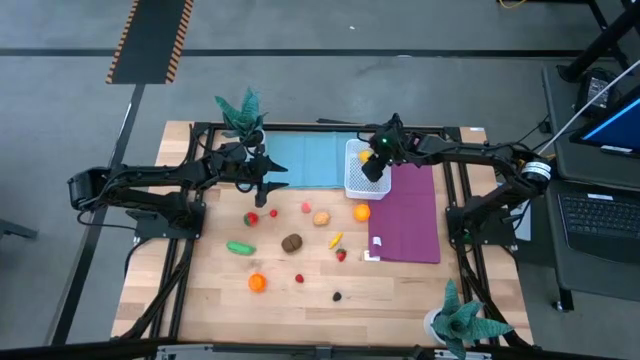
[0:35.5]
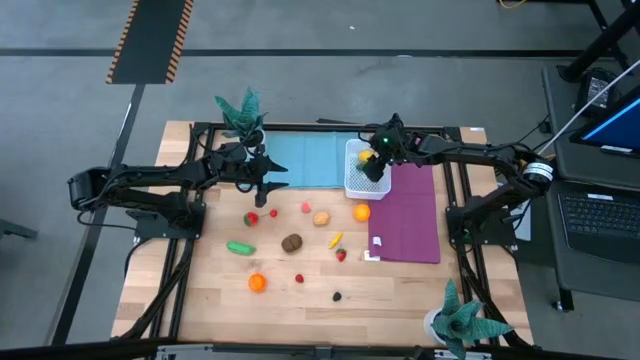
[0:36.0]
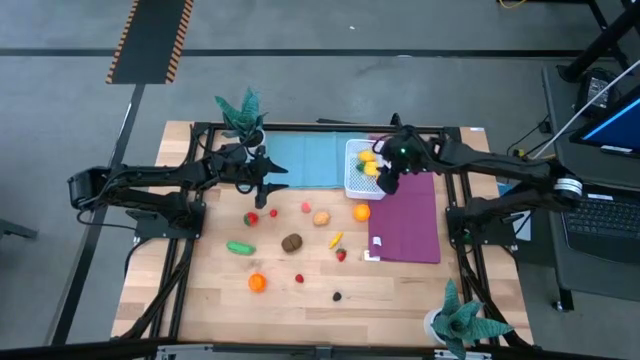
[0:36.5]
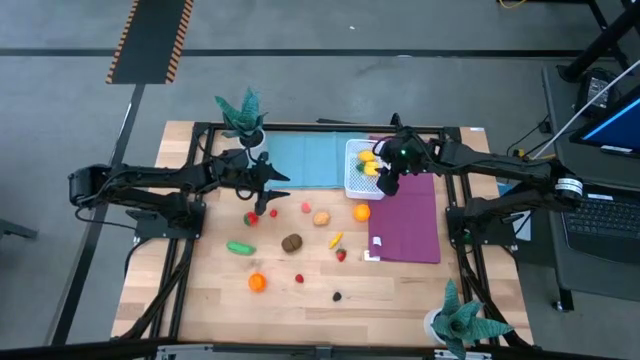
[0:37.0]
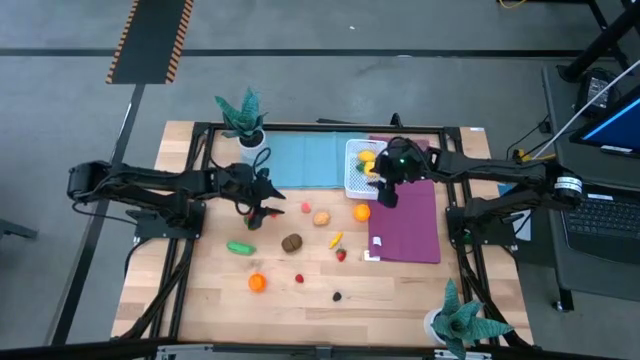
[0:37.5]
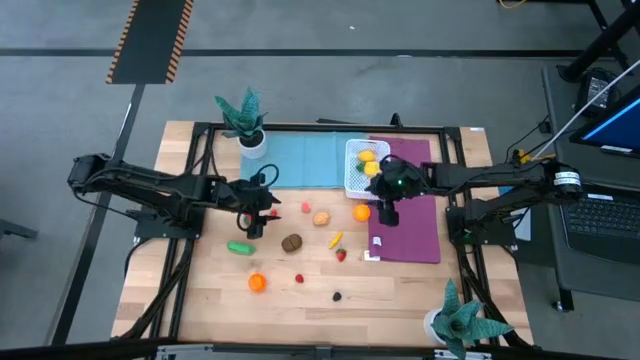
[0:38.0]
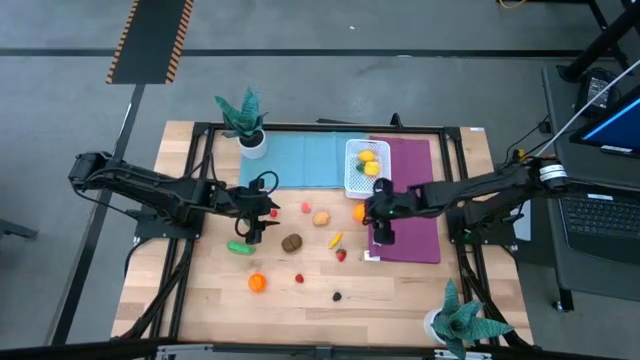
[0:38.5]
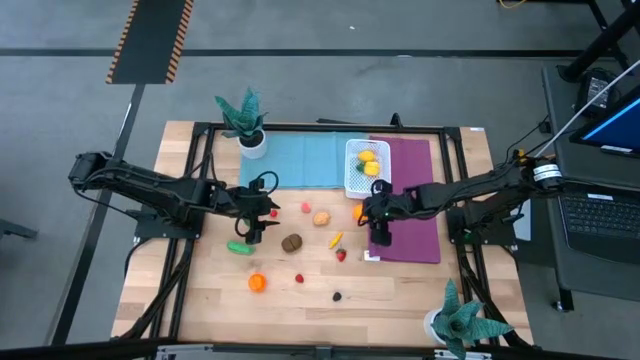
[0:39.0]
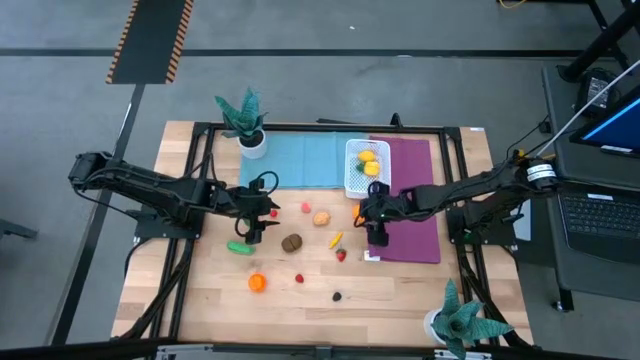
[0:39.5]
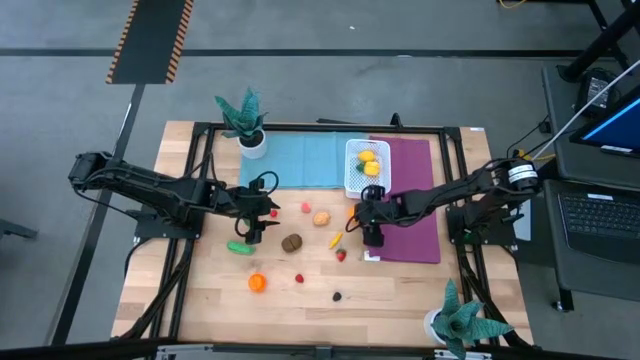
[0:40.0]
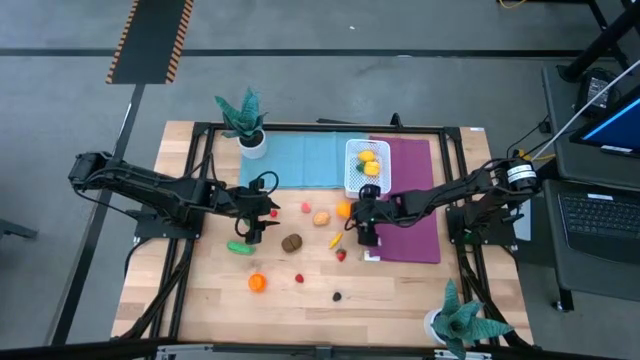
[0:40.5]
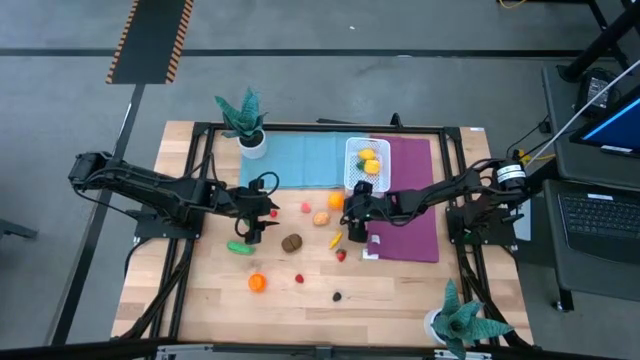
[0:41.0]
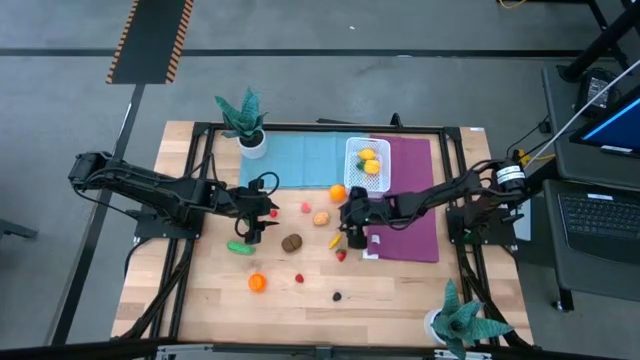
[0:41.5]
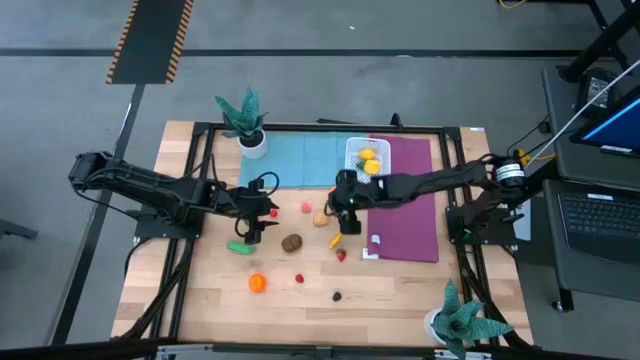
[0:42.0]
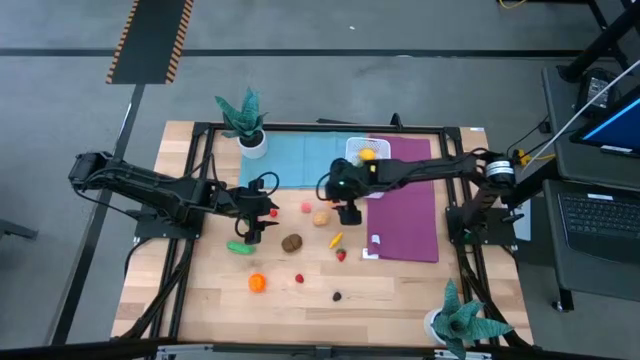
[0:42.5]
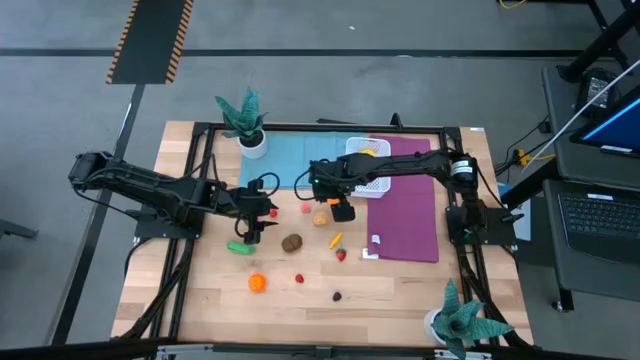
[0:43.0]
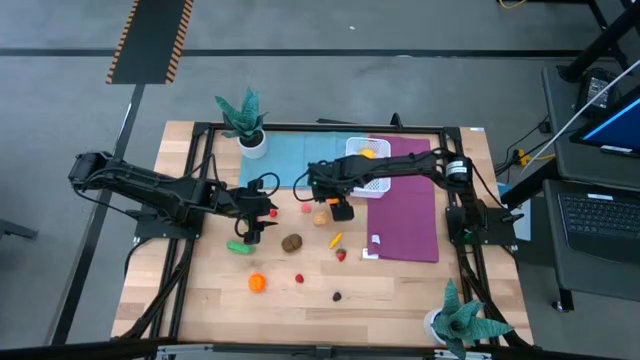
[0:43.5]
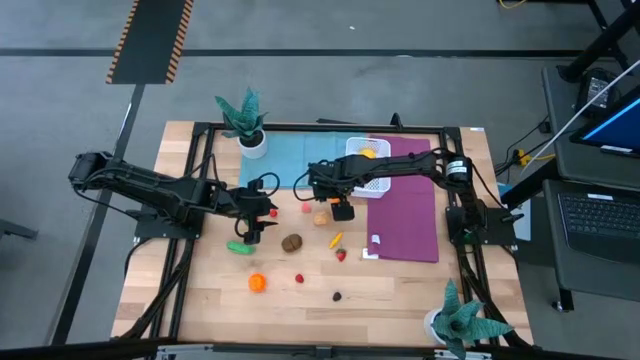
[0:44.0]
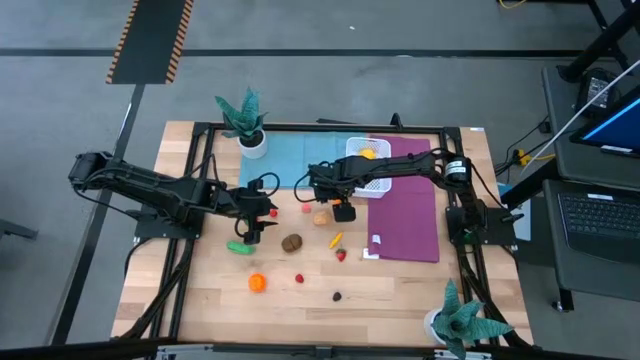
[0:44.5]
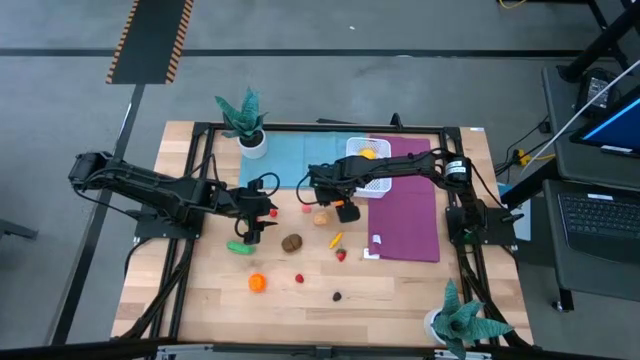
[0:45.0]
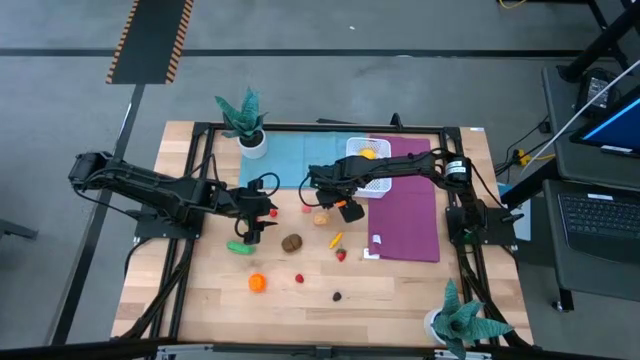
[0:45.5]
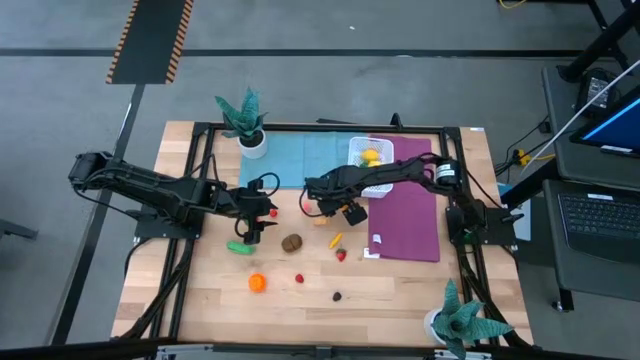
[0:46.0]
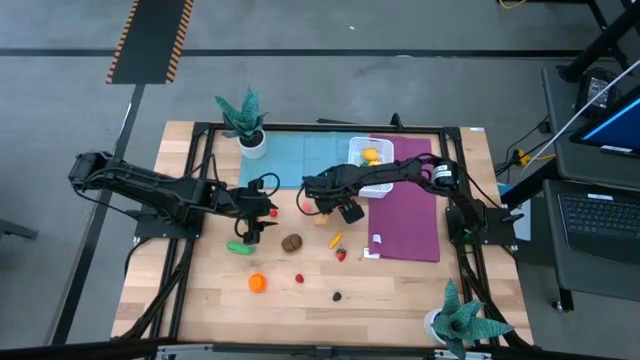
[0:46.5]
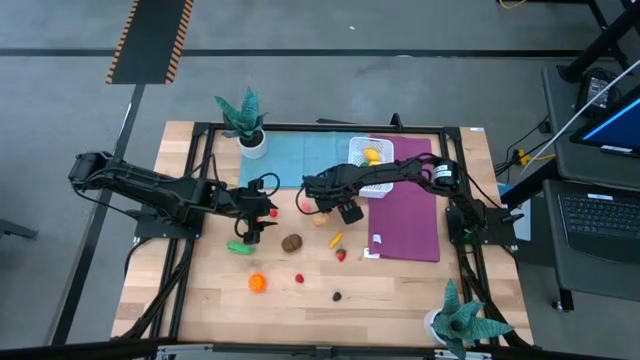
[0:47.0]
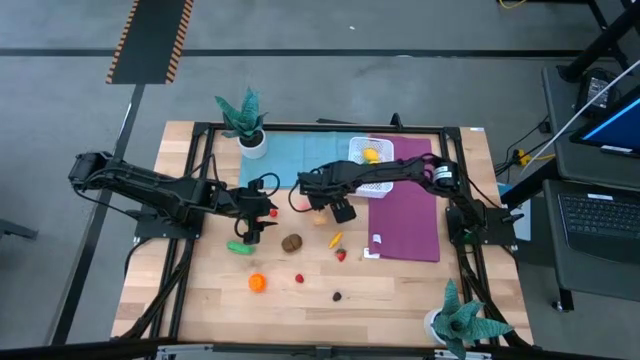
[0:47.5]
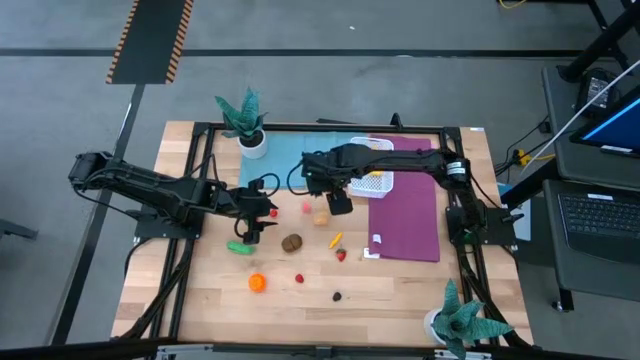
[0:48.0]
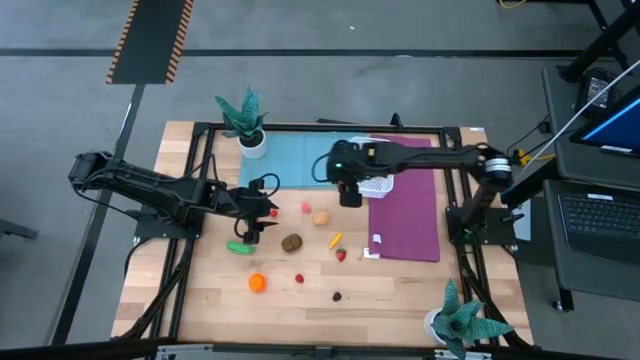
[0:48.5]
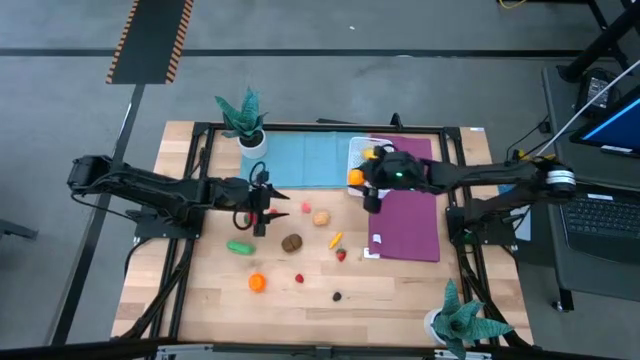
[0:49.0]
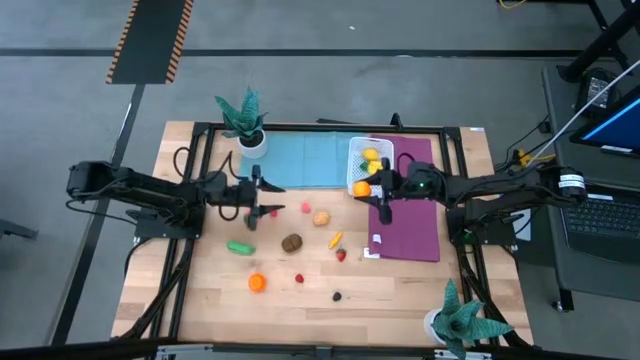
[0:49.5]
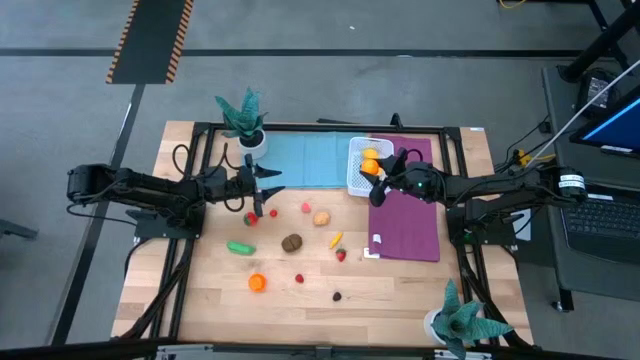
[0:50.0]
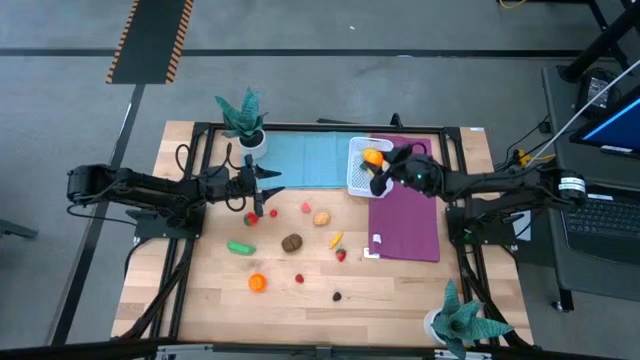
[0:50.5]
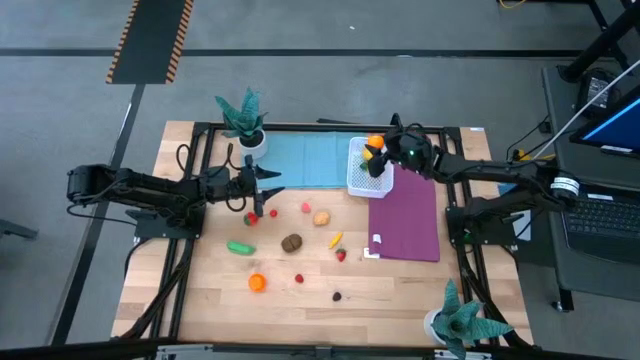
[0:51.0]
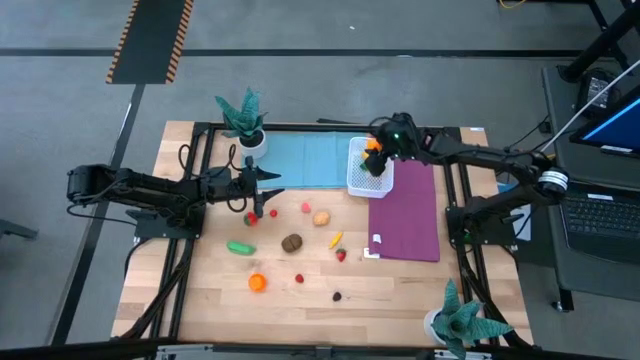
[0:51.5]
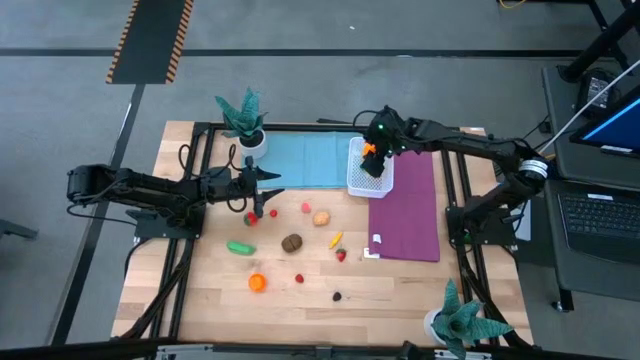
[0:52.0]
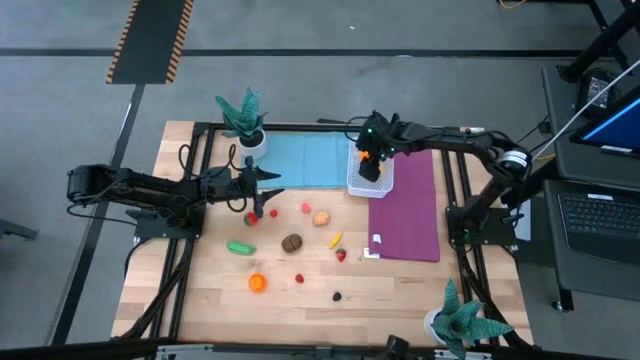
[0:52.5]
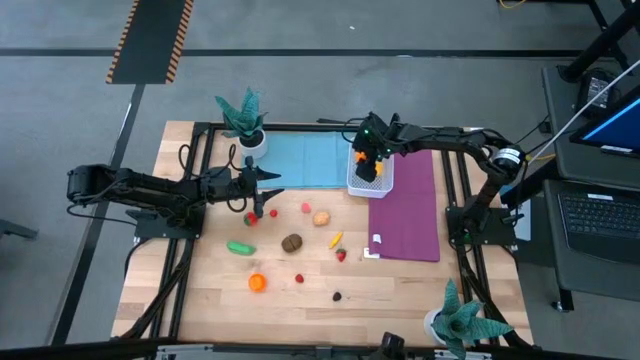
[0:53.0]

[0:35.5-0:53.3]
Task: Pick and placing Produce into tupperware
Put the orange orange into the white container

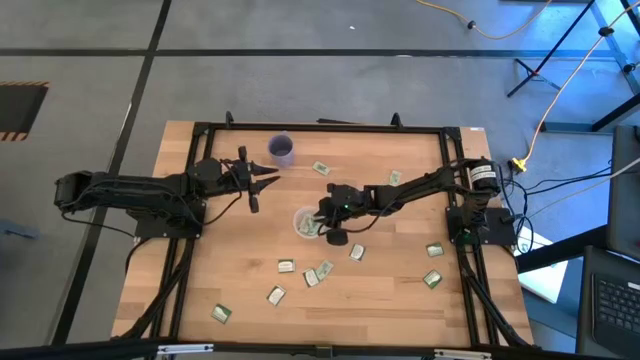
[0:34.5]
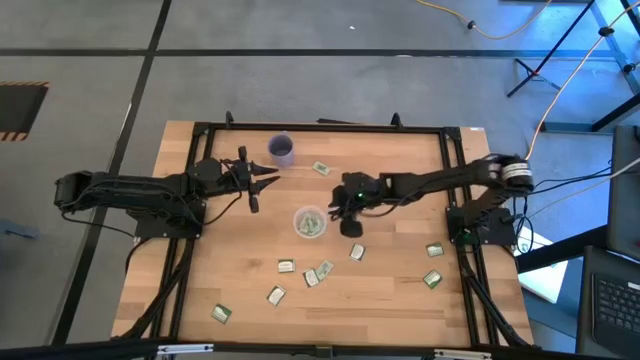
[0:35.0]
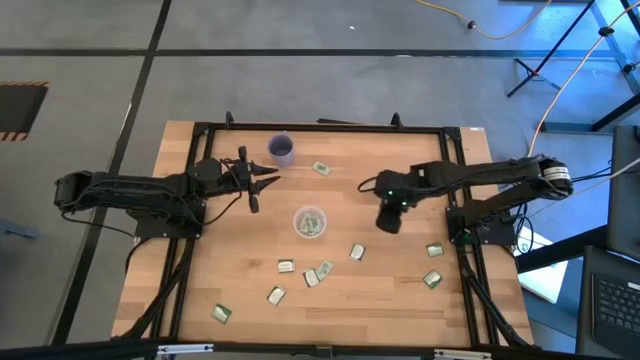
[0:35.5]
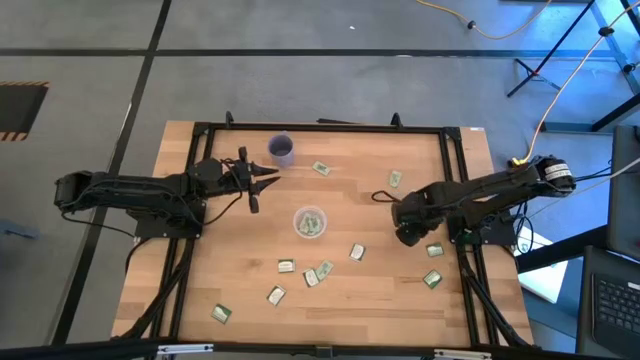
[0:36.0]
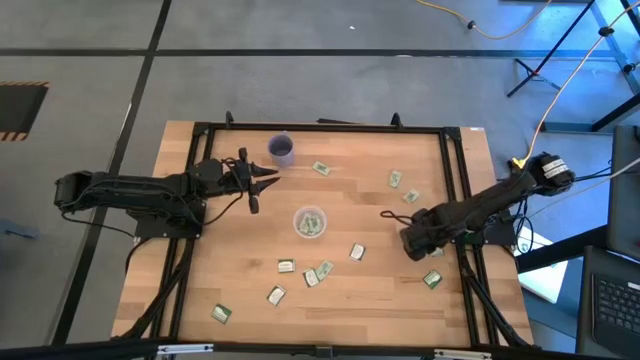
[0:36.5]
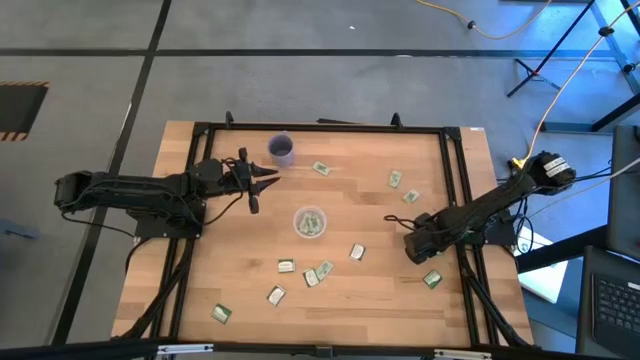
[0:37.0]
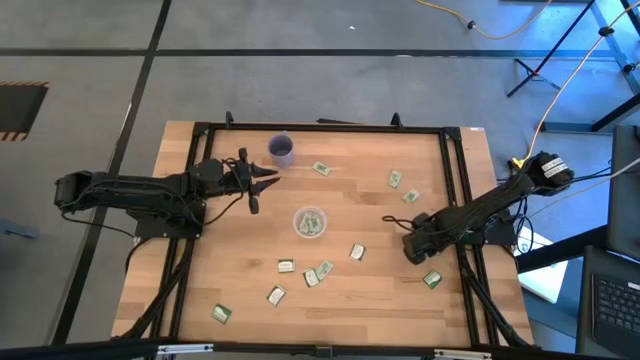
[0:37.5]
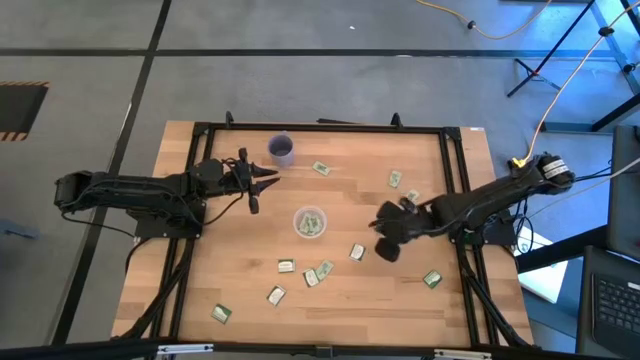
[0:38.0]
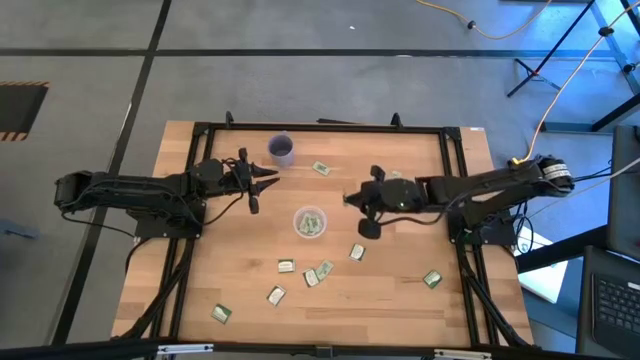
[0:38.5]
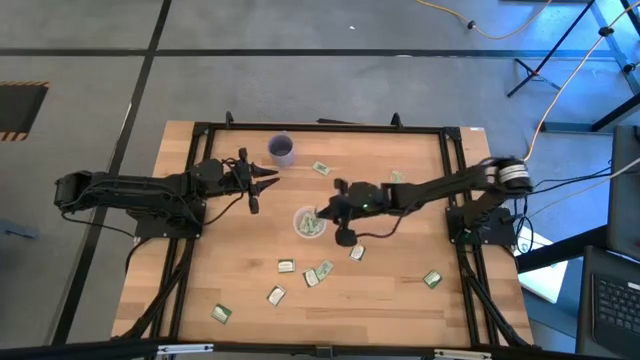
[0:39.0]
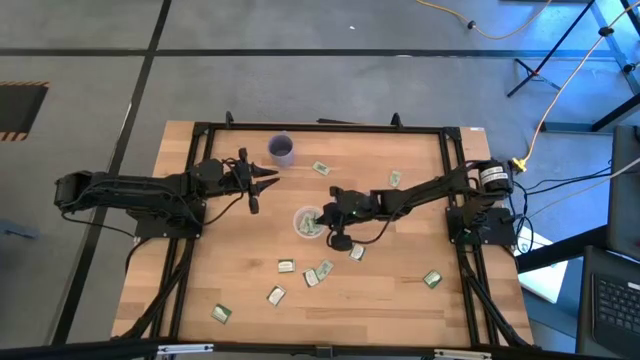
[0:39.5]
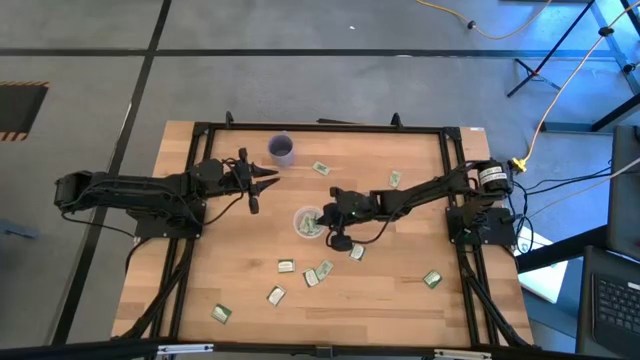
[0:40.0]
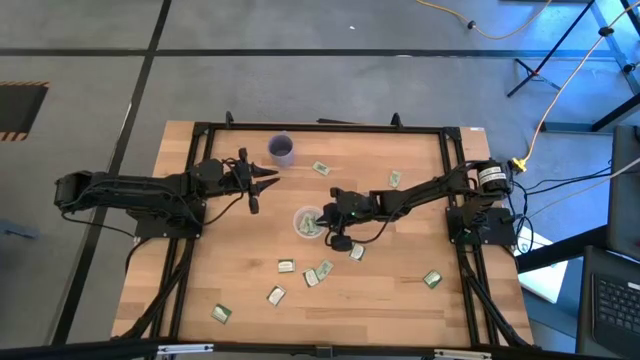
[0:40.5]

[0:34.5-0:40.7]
Task: Pick and place Stevia / Truvia into bins
Put the truvia packet into the transparent container
